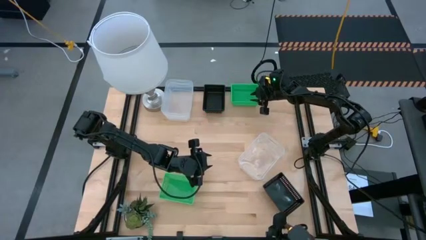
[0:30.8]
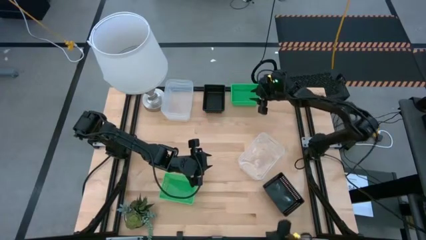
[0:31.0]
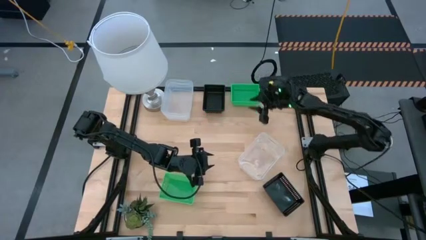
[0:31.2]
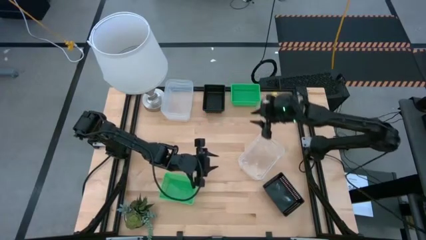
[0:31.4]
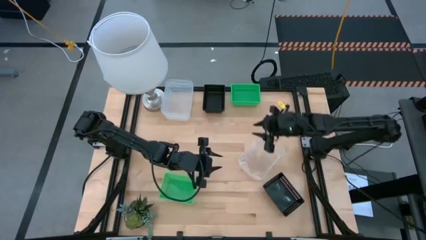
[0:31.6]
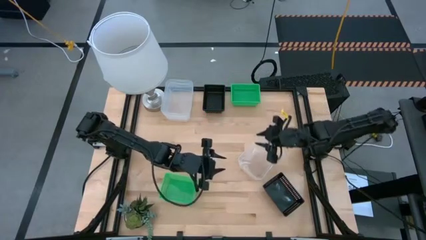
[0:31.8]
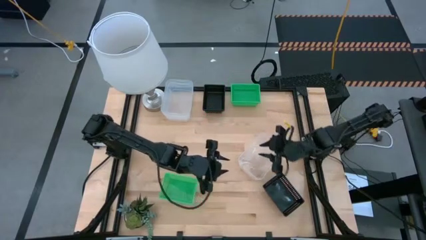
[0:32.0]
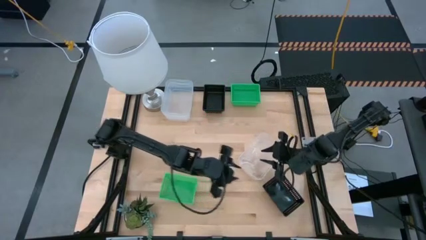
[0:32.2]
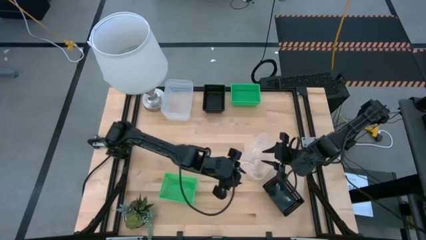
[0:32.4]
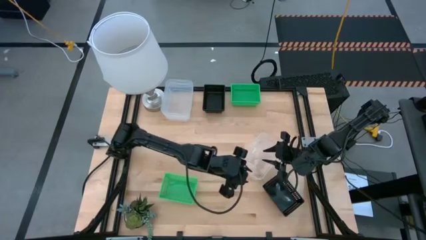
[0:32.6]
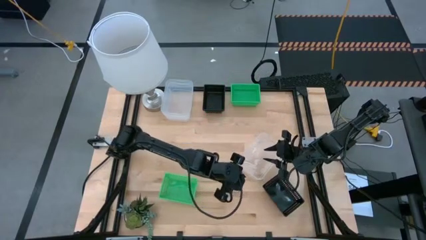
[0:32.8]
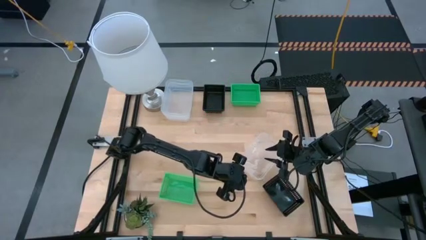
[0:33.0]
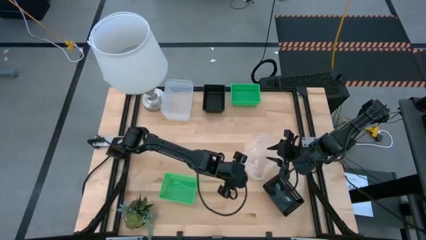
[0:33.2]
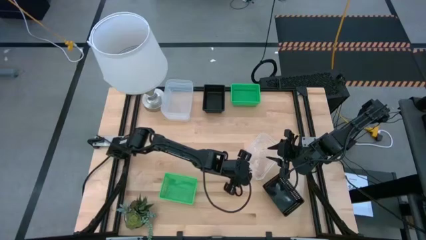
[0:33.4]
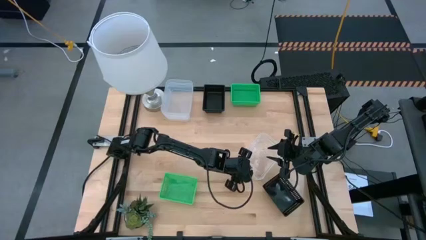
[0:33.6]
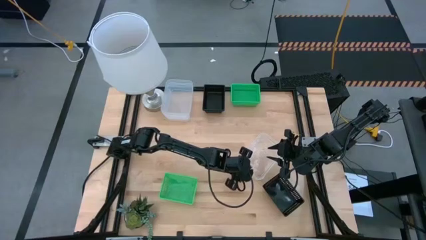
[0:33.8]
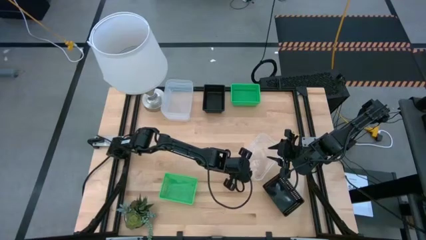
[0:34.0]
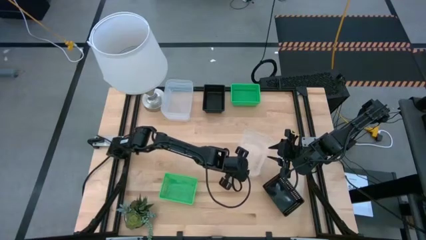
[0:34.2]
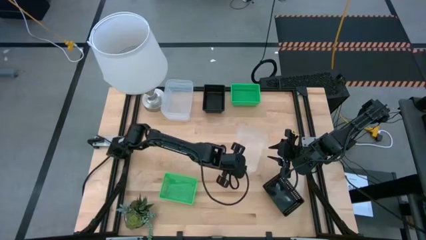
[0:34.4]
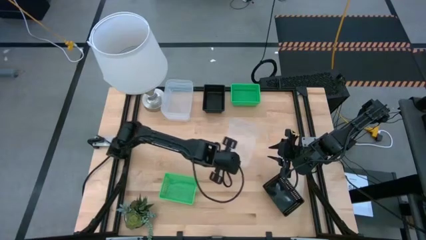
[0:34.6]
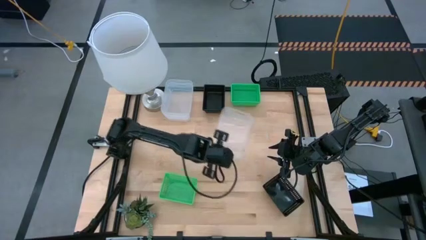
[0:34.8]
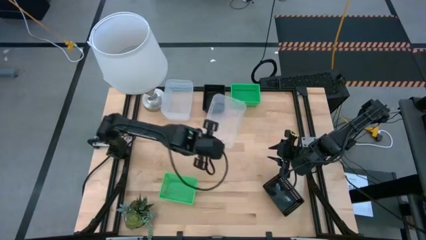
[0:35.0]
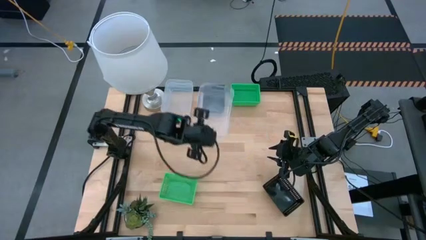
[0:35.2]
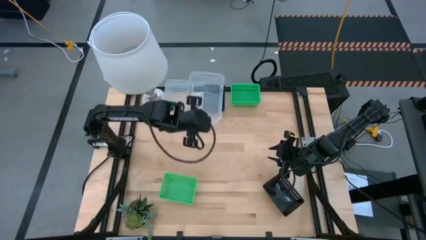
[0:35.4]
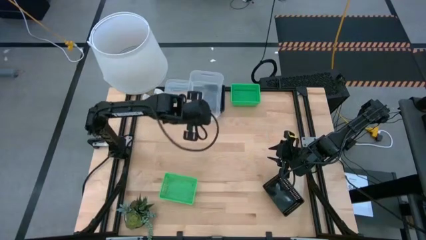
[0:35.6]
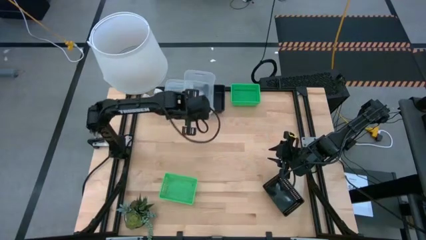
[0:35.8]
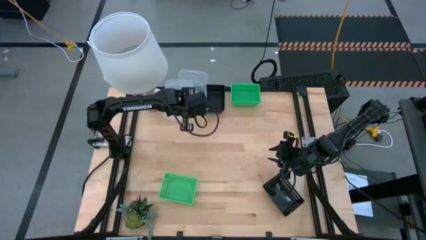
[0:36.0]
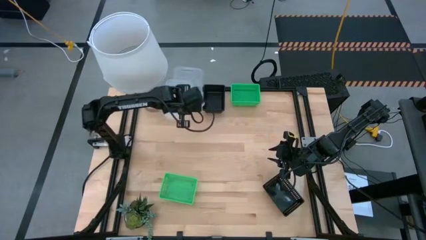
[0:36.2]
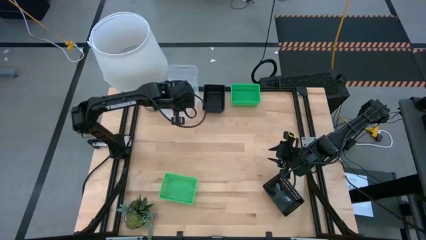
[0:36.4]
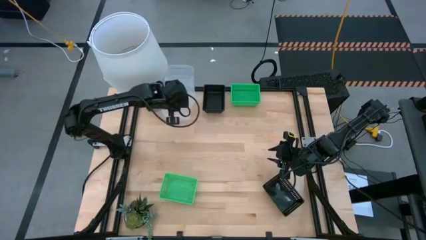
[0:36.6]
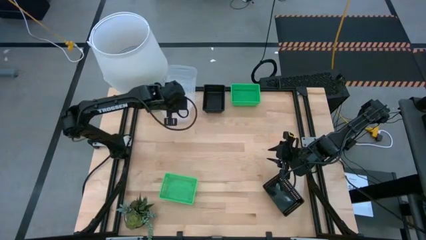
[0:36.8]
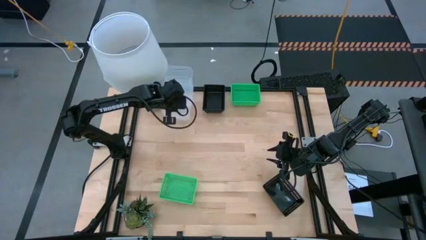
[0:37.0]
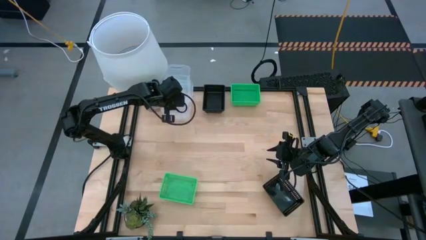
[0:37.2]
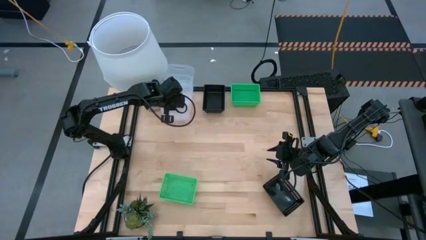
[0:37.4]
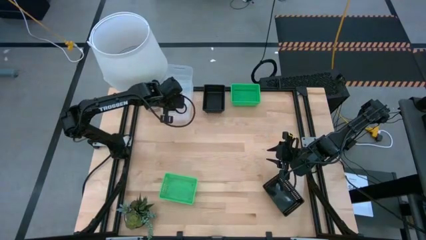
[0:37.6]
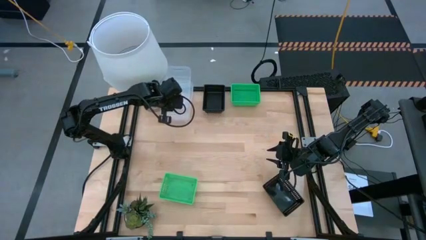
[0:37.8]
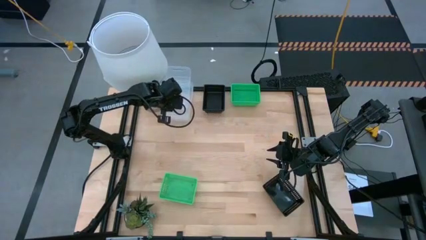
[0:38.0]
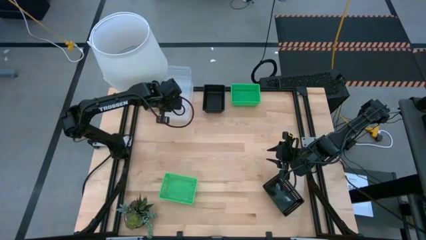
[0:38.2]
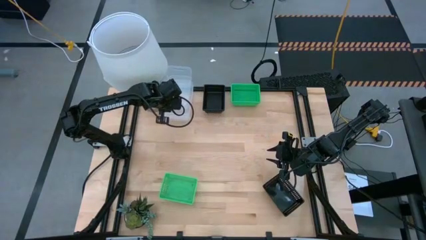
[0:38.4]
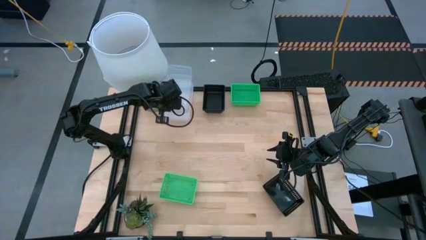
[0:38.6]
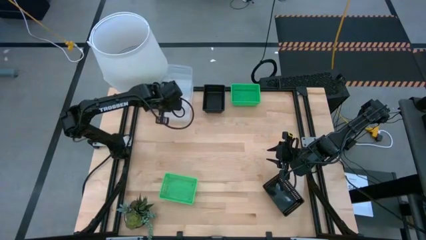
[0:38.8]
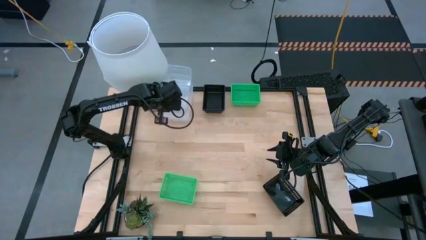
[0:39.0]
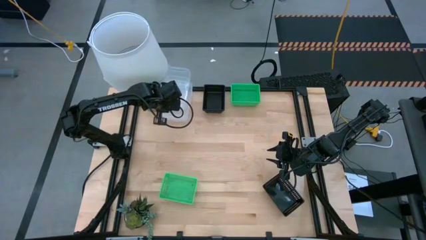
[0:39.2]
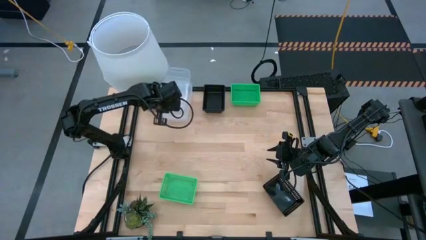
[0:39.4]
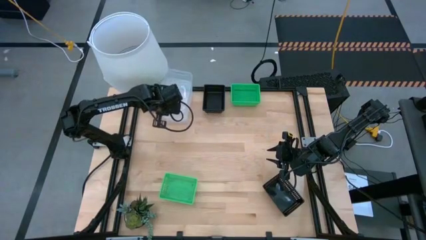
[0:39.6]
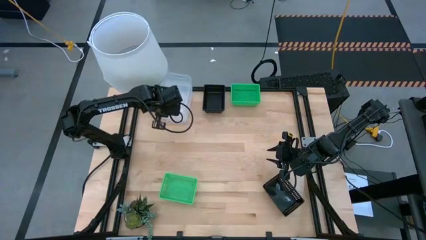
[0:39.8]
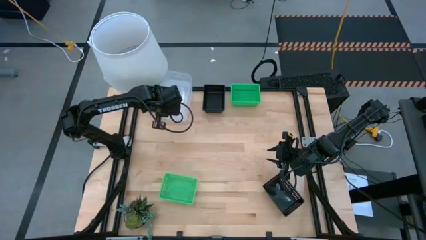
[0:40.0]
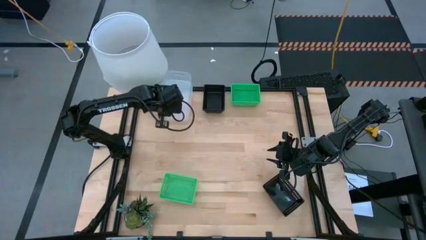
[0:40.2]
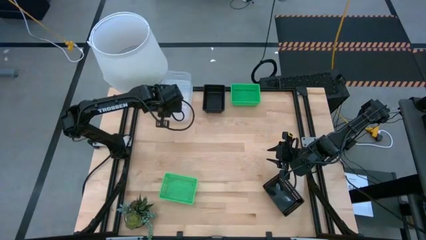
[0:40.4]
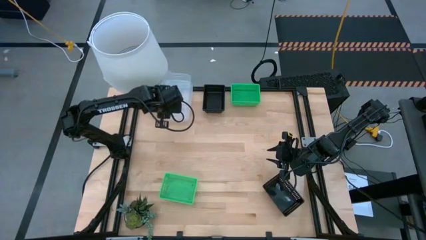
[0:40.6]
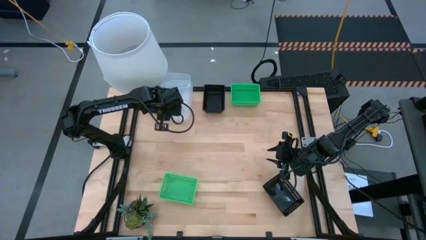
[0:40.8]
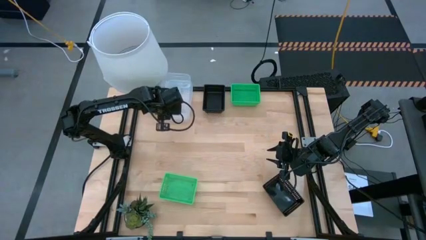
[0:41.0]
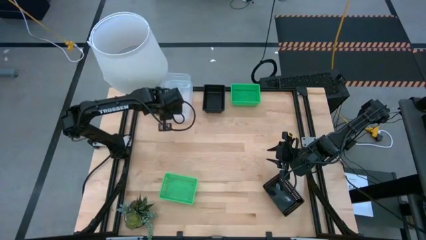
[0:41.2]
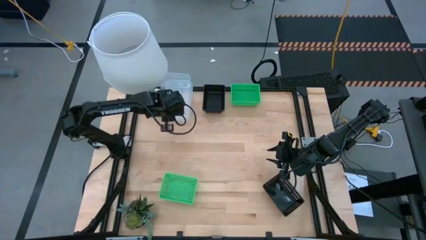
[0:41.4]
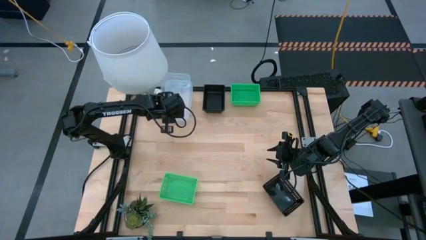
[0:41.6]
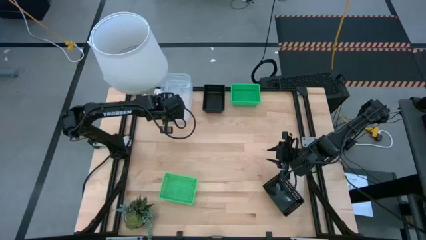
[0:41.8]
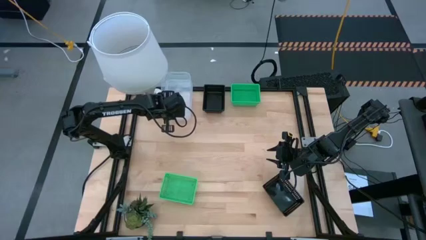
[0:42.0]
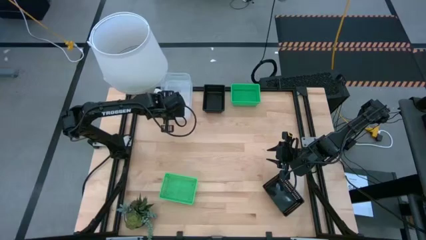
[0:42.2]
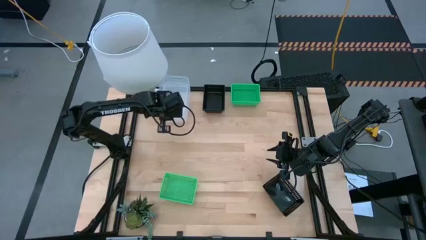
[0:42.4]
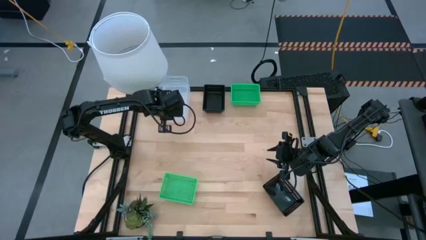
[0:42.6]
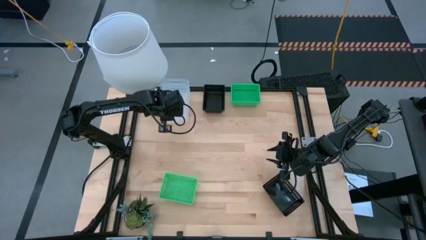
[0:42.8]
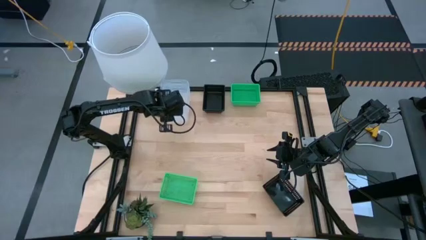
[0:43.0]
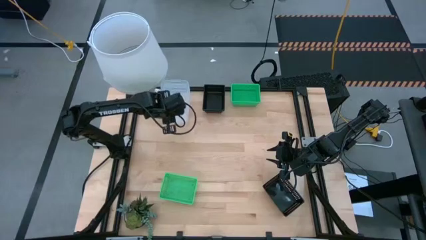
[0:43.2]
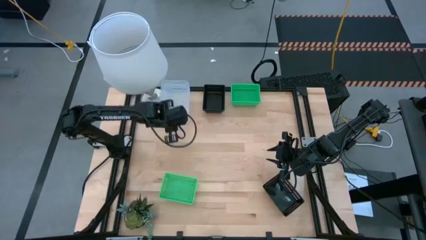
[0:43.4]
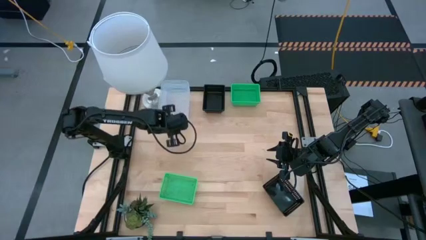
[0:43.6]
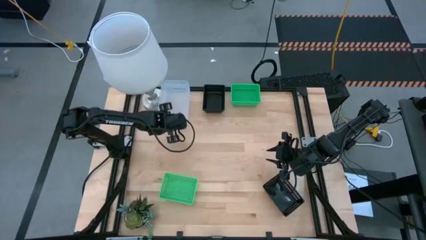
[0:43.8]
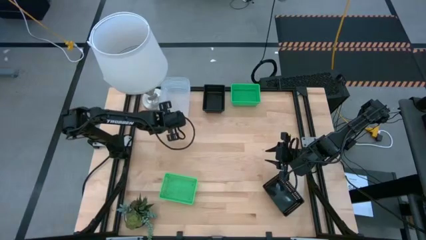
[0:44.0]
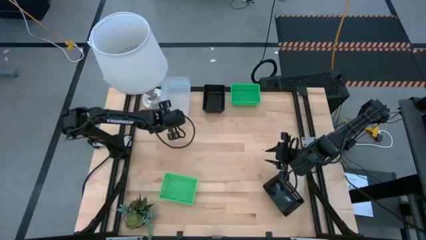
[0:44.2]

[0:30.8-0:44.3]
Stack the transparent bin on the top stacked transparent bins
